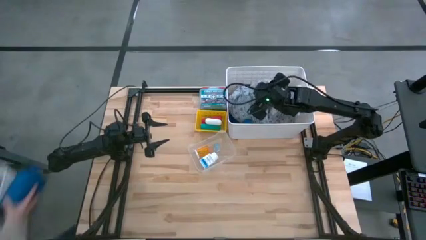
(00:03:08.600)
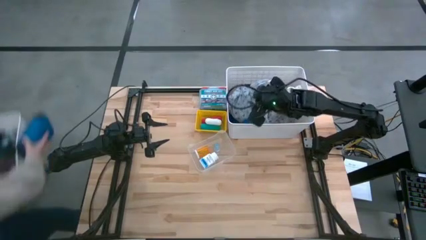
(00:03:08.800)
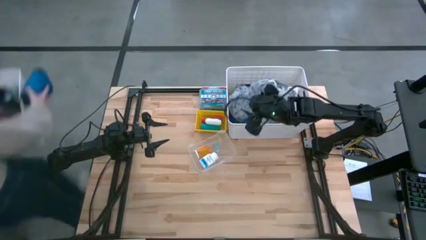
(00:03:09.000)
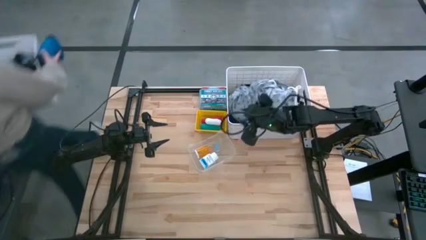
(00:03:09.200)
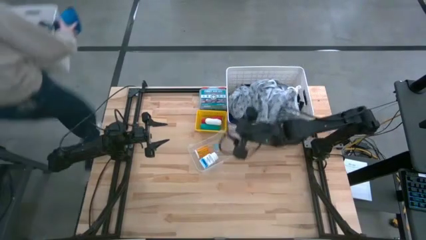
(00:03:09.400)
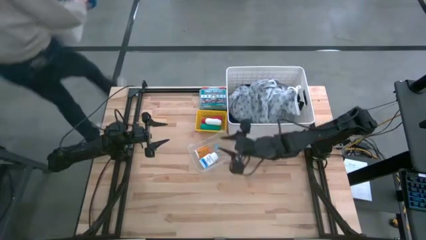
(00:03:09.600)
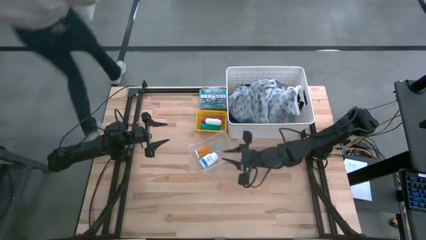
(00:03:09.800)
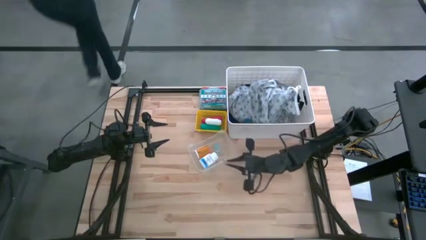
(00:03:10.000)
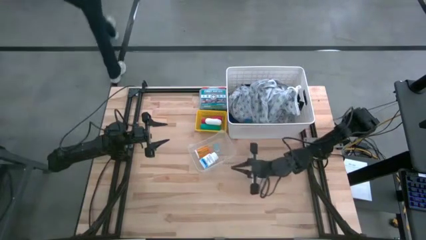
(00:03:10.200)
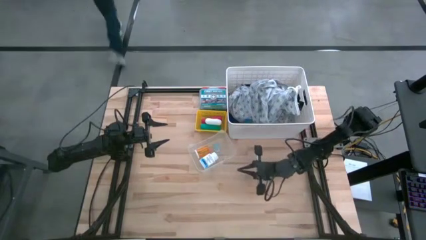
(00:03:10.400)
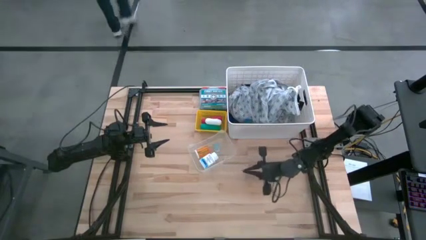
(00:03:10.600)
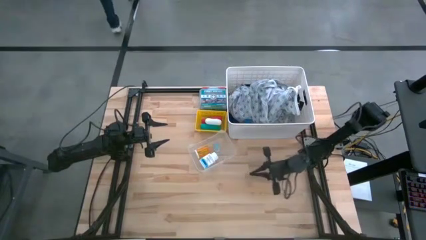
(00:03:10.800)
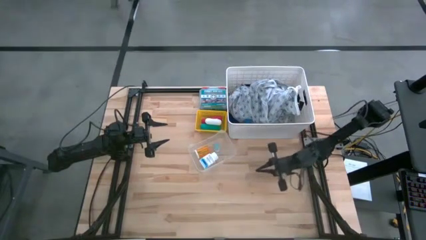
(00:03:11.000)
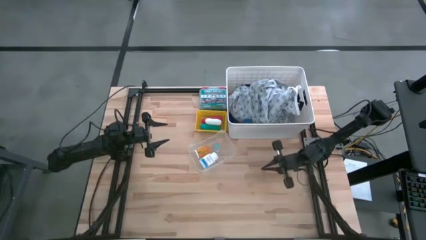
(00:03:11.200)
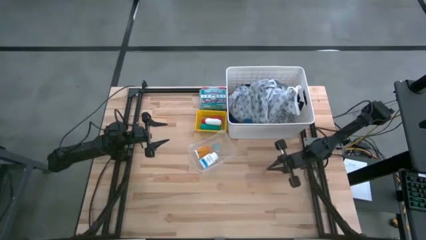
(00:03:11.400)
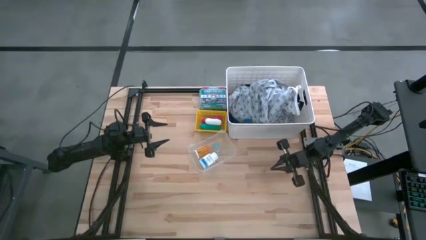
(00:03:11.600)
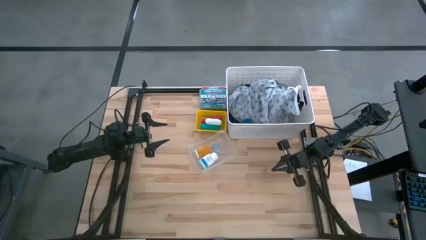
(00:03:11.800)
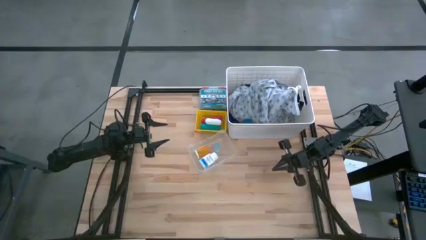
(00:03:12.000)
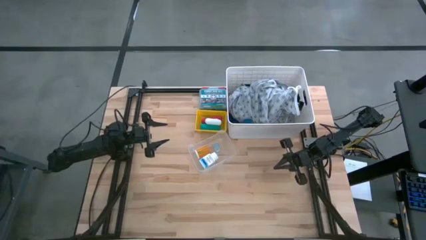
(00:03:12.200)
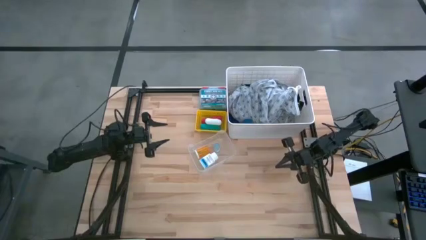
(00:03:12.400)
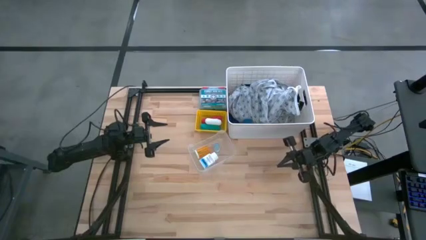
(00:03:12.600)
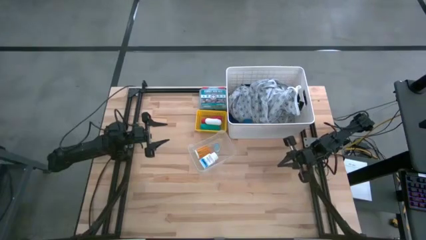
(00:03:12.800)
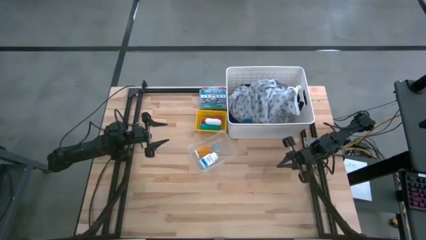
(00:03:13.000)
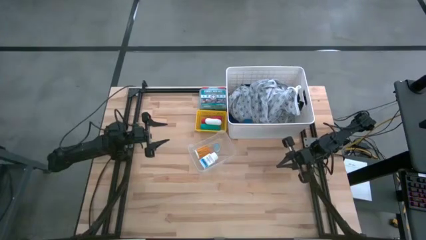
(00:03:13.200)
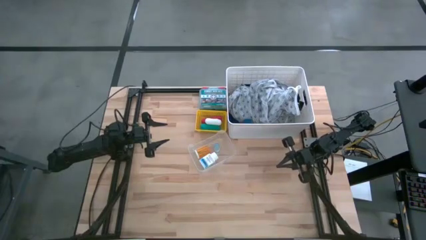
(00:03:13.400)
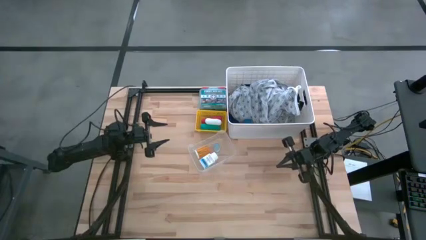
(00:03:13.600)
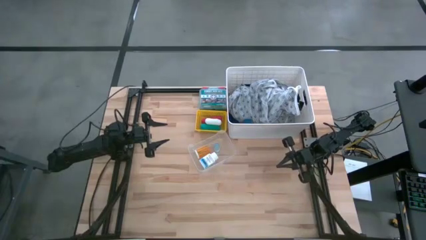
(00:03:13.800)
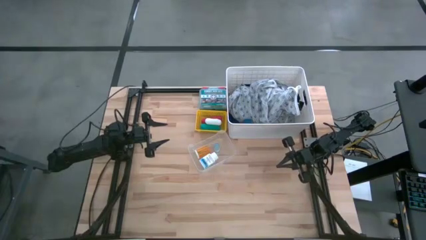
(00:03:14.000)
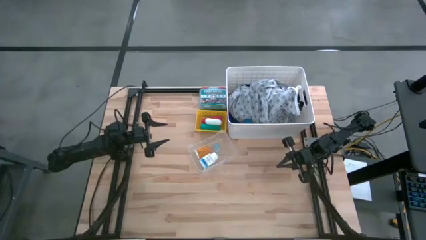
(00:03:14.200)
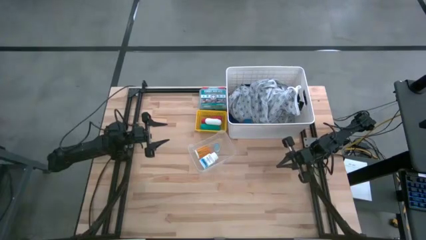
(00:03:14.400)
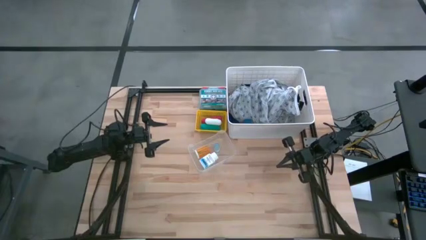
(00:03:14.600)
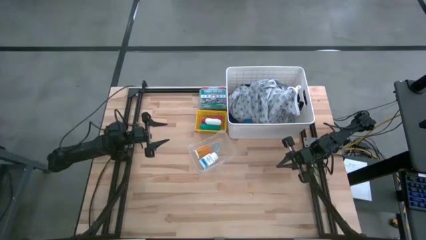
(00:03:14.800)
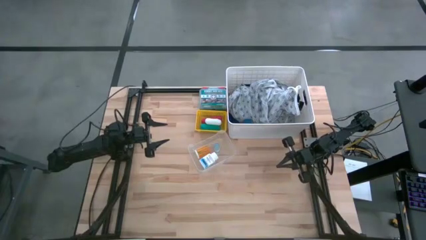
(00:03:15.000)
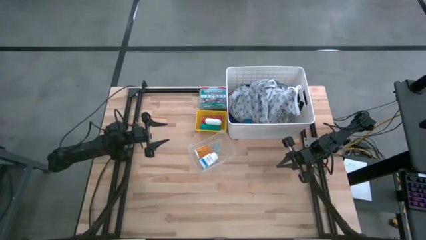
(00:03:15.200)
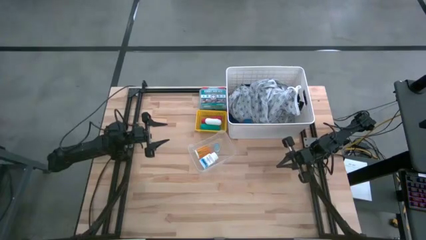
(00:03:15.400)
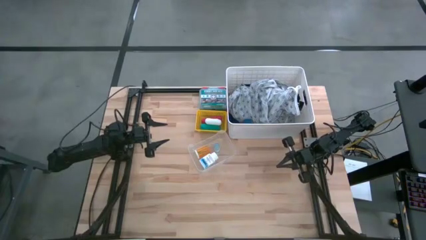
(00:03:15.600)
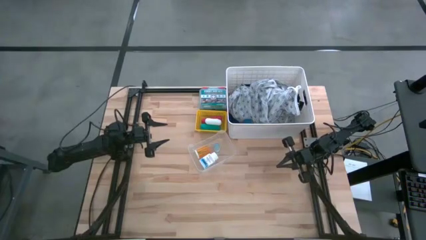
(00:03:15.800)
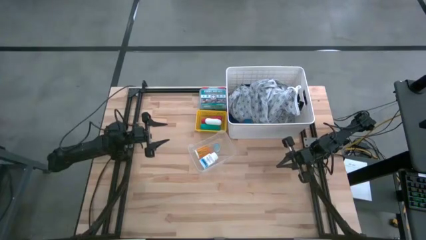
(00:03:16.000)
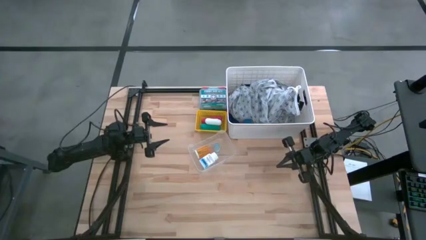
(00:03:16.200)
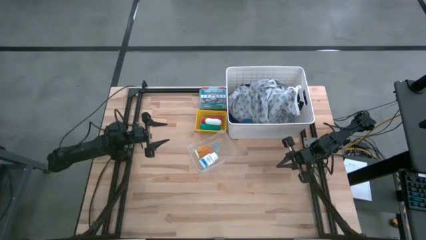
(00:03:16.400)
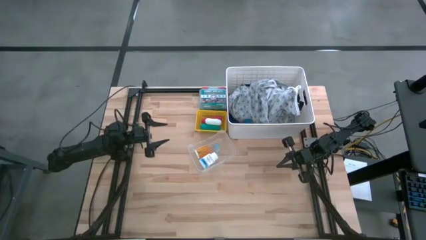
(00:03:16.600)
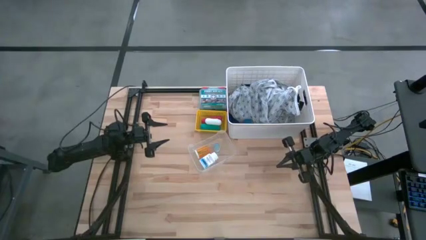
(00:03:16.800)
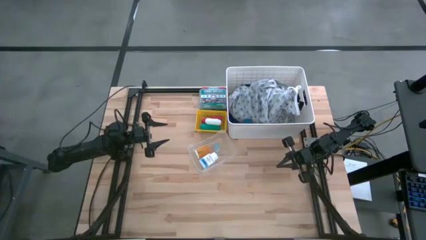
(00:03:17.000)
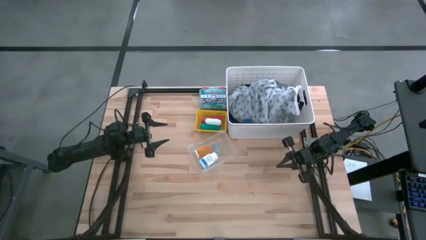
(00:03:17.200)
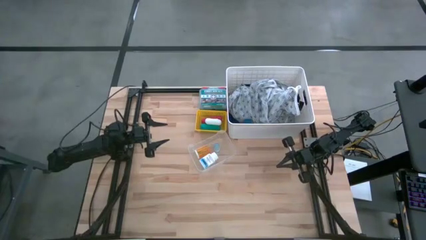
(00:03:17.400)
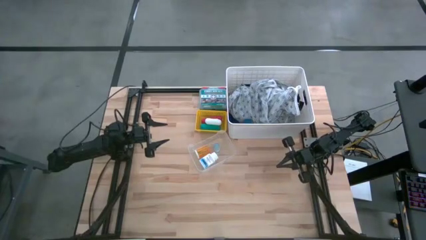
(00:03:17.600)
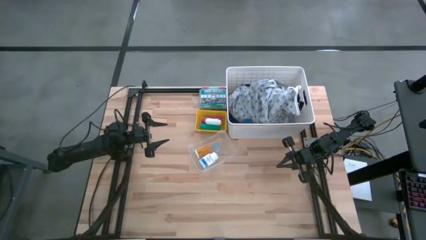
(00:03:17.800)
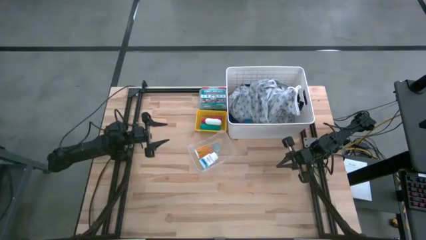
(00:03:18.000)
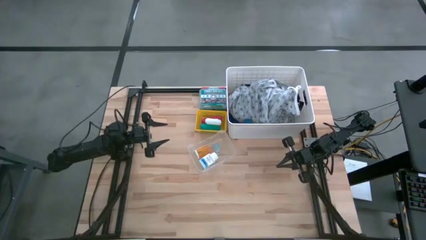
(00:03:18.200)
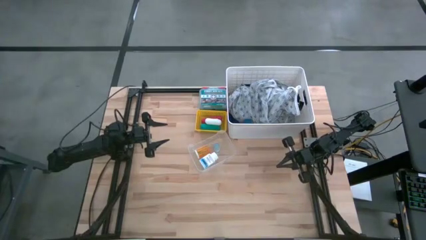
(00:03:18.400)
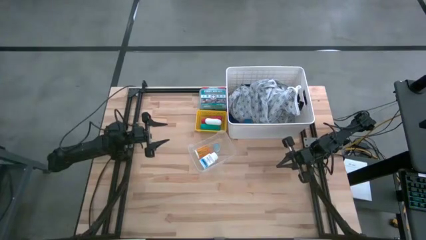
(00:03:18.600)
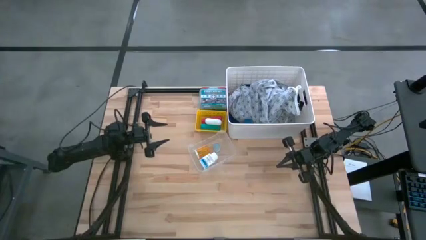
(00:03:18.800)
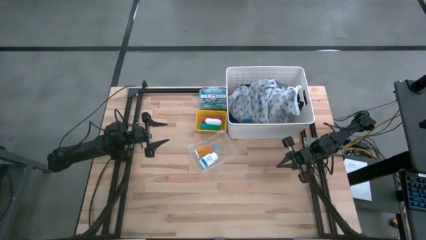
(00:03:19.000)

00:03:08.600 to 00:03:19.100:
Task: Pick & Place Medicine items
Return to Home Position
